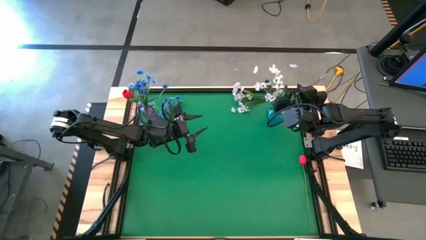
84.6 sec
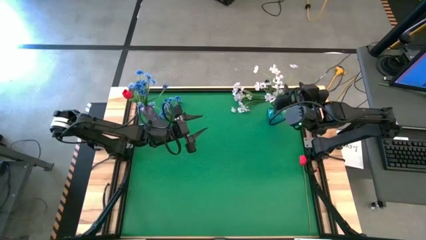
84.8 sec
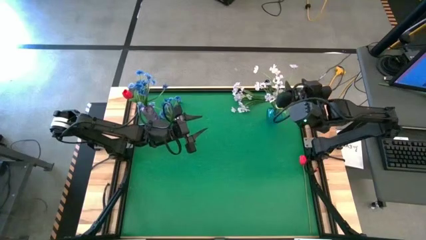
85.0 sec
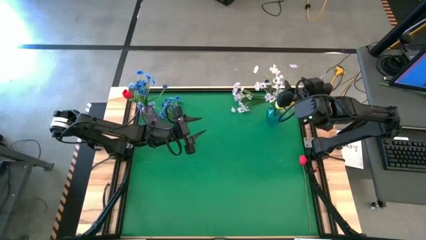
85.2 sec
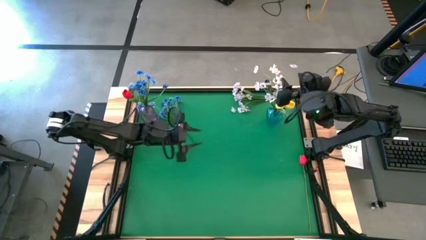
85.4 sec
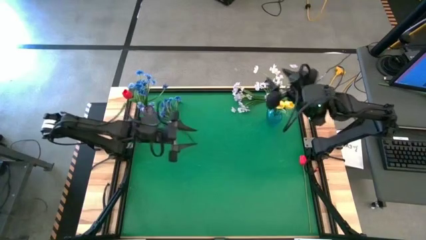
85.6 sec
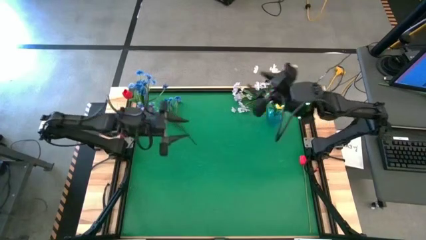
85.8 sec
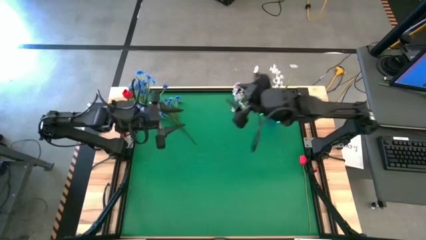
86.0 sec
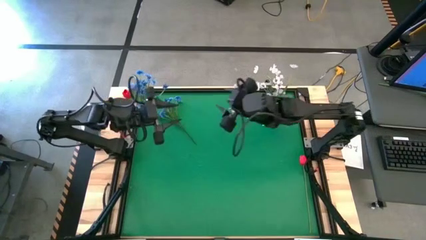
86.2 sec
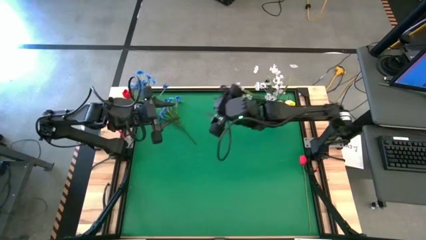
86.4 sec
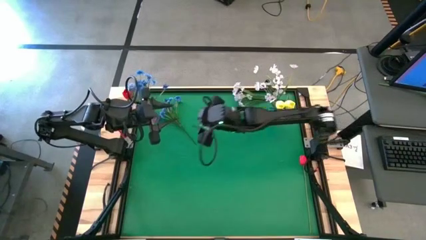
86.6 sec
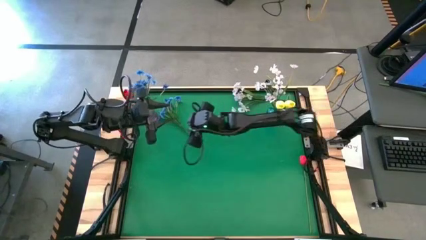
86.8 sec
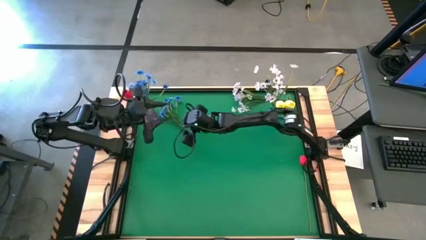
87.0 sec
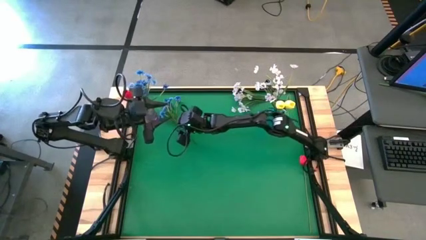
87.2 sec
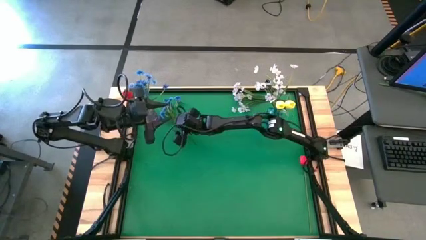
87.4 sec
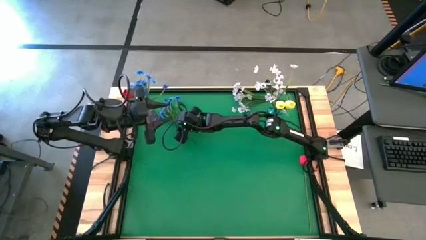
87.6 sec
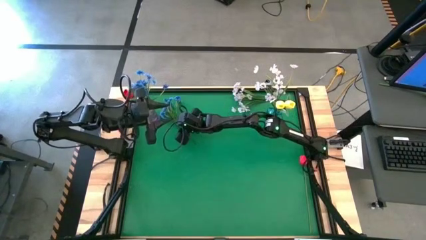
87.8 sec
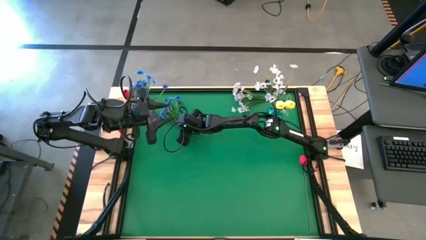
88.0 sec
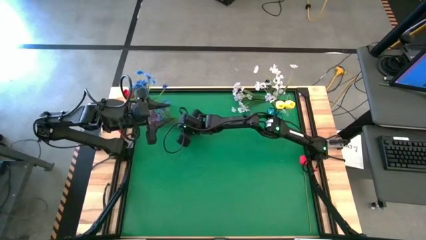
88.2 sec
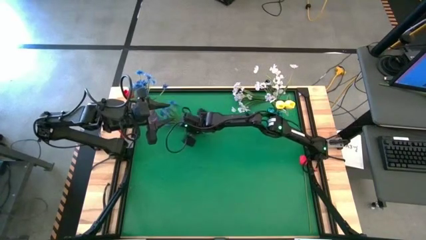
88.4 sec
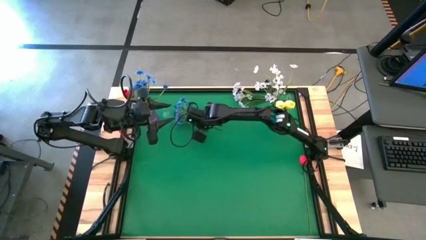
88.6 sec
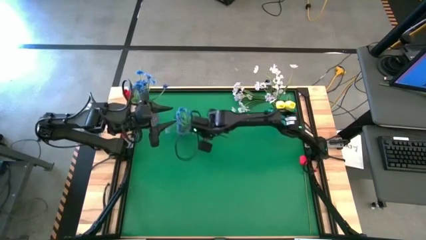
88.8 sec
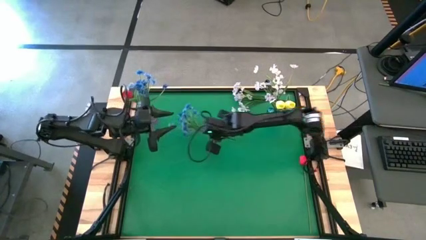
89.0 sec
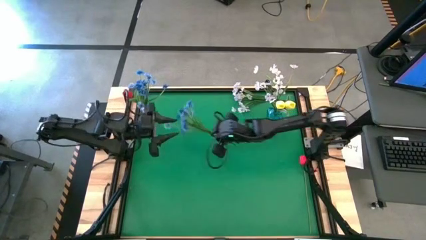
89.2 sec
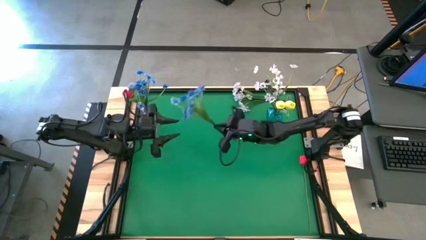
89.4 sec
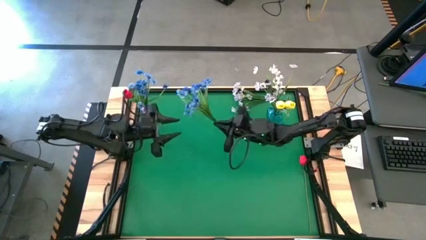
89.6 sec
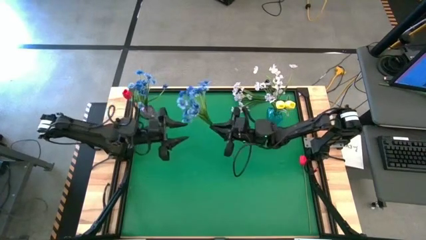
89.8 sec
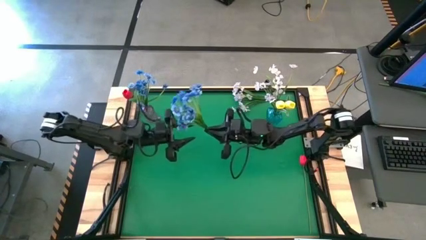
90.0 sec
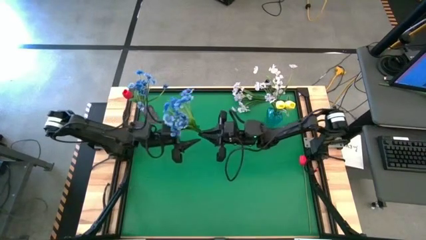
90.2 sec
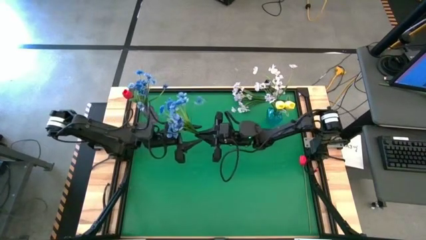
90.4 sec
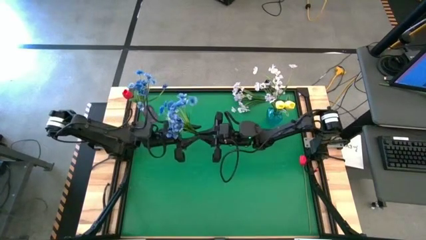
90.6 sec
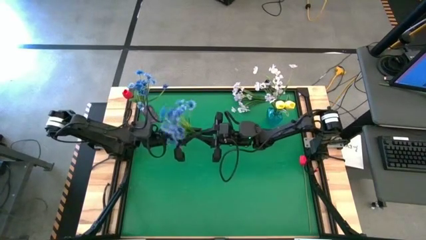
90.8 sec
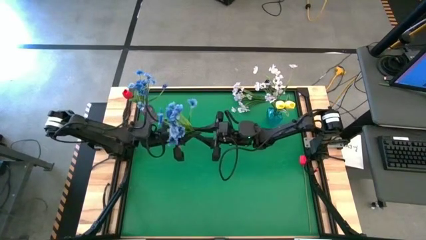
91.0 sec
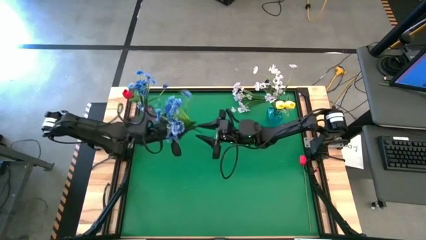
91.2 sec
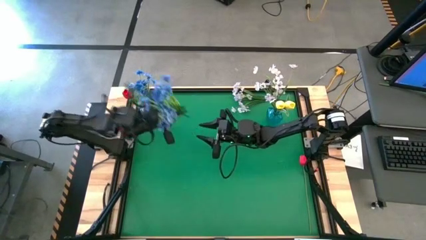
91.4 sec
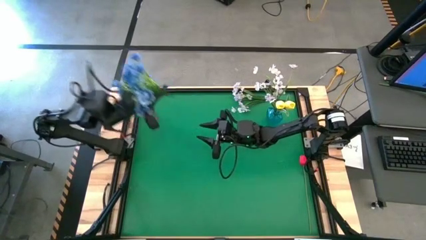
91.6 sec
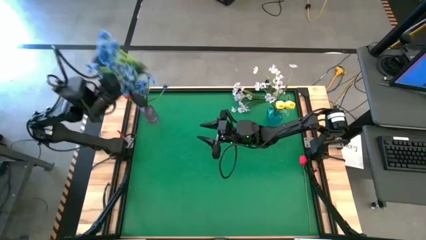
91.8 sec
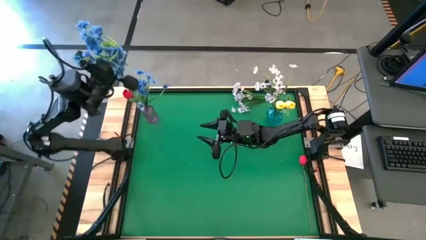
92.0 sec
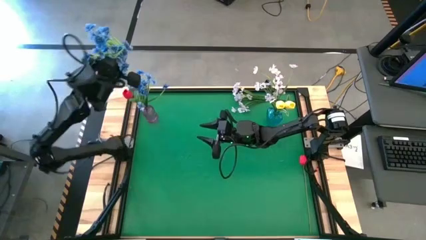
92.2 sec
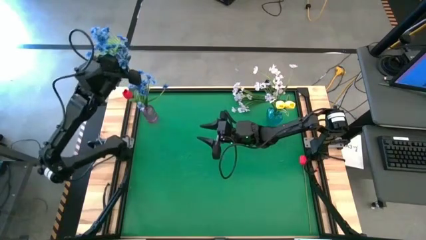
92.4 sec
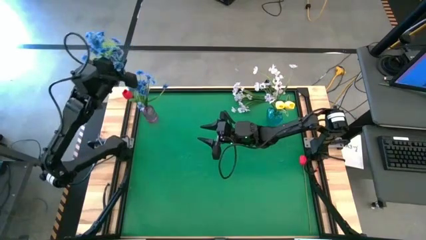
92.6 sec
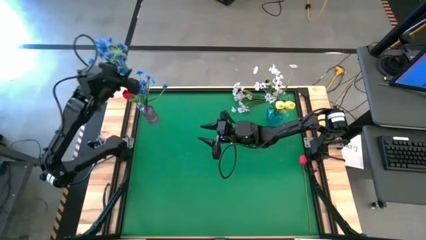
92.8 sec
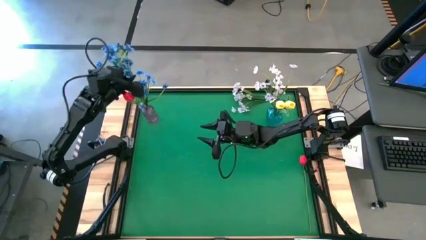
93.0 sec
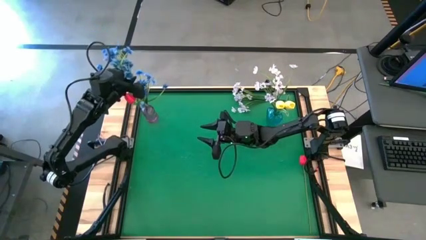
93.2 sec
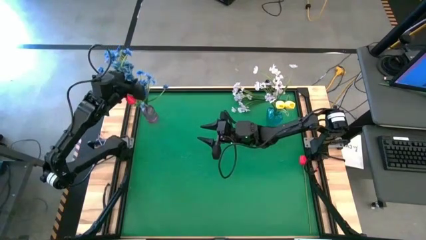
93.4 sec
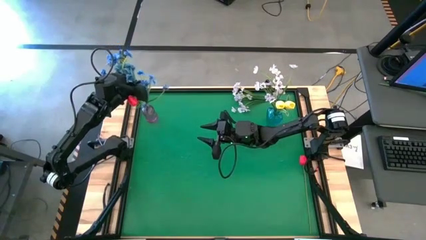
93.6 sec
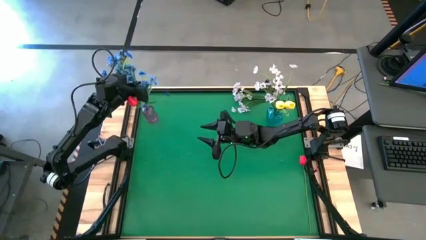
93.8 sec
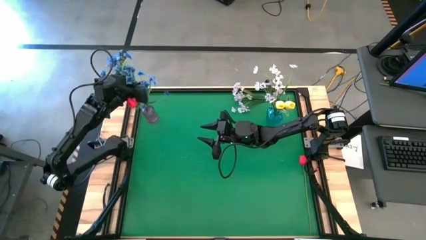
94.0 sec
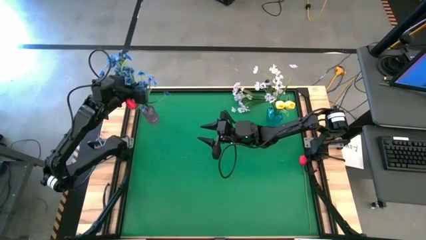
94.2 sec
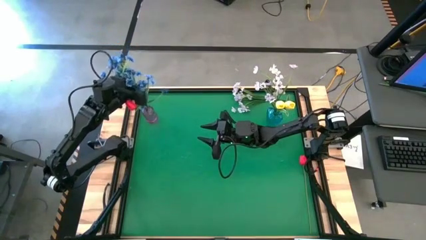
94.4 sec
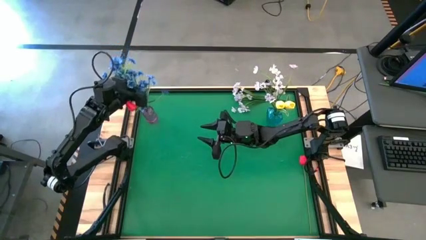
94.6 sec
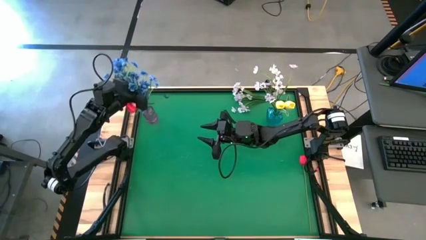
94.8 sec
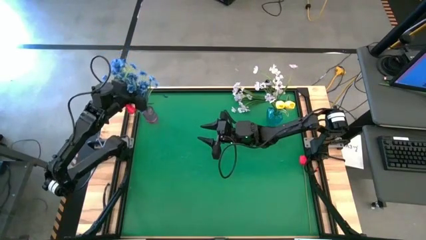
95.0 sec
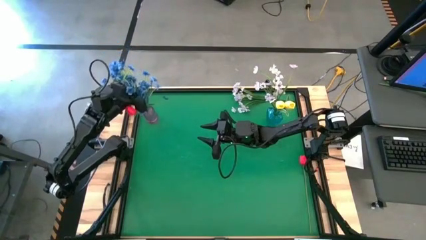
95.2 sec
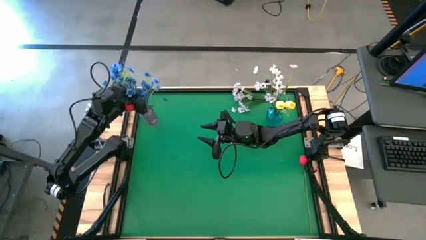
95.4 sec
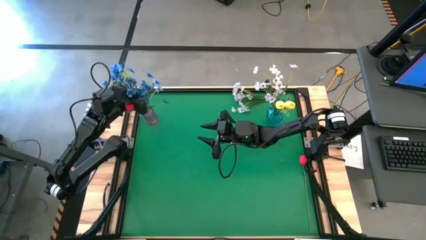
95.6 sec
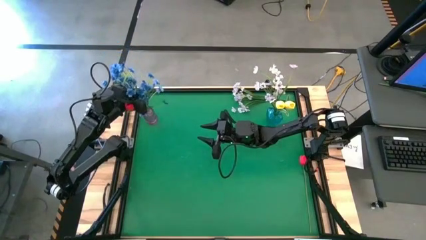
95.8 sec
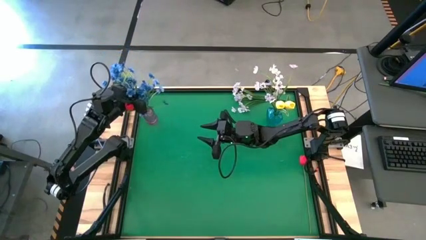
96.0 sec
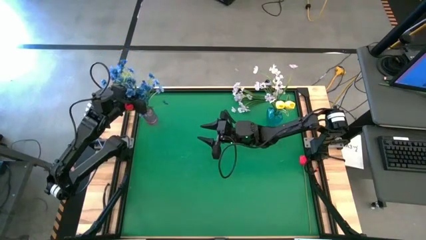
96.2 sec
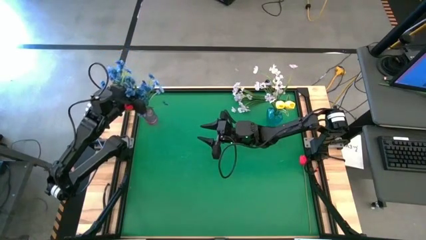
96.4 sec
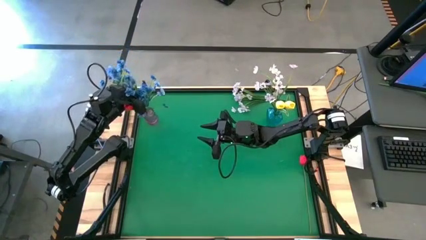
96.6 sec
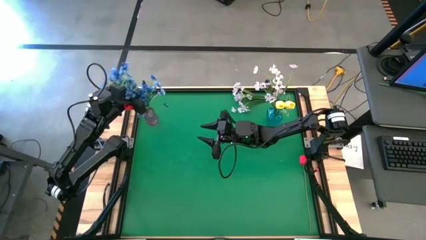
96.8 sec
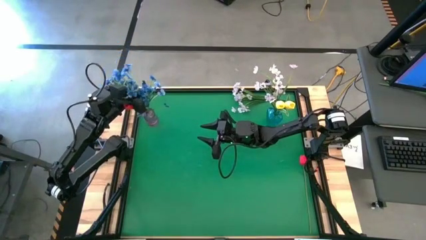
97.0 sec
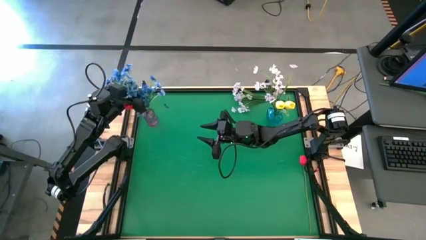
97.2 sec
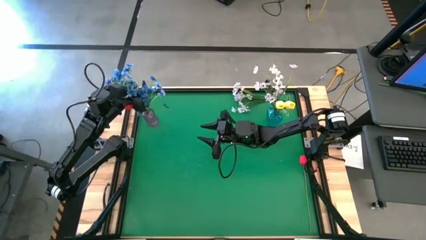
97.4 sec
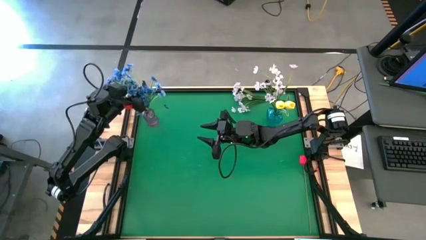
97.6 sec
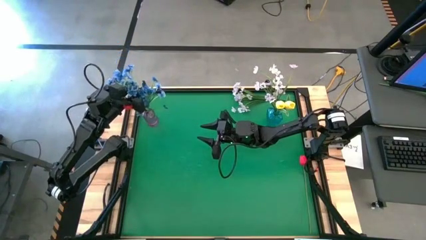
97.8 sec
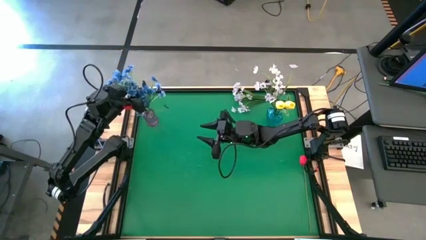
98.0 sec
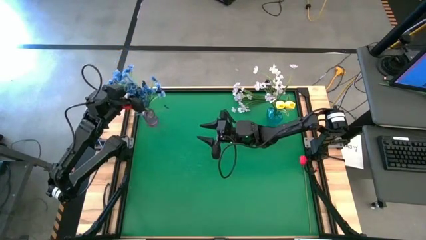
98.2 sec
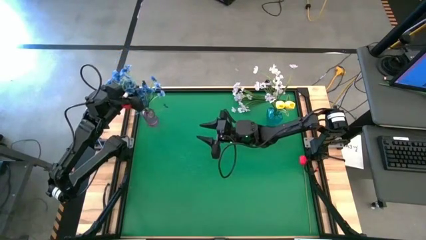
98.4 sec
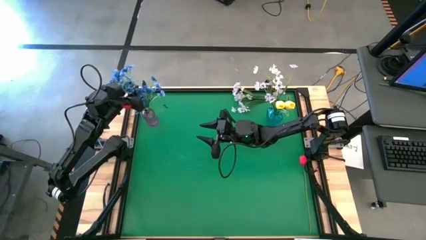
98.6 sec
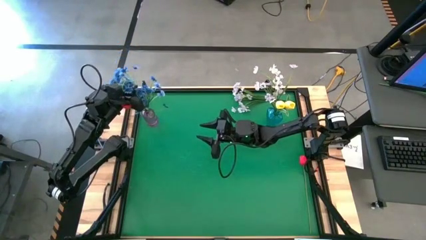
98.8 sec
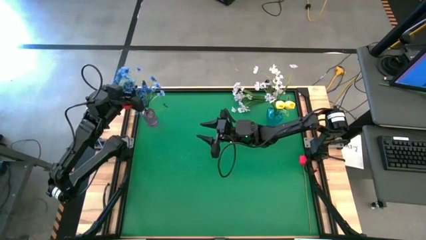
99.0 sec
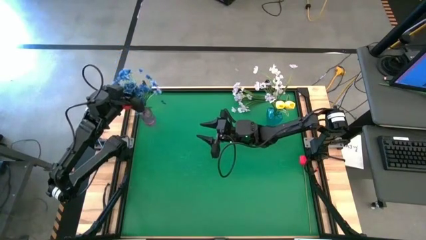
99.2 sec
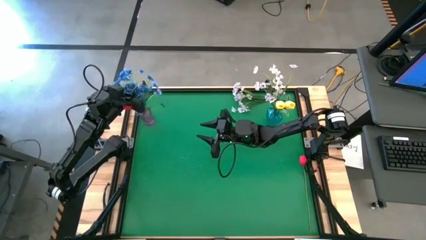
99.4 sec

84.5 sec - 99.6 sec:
Task: Sort flowers into vase by color
Put the blue flowers into the purple vase
